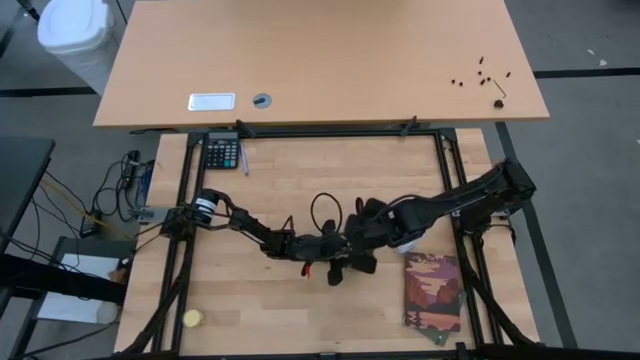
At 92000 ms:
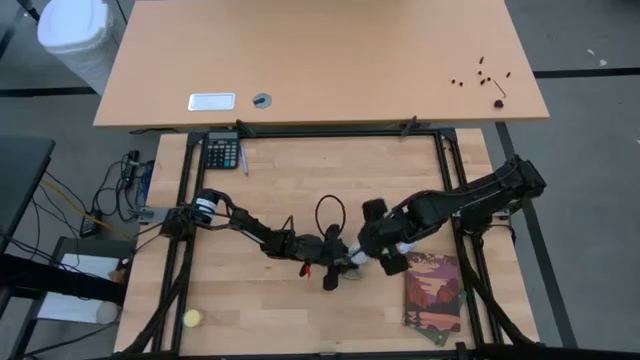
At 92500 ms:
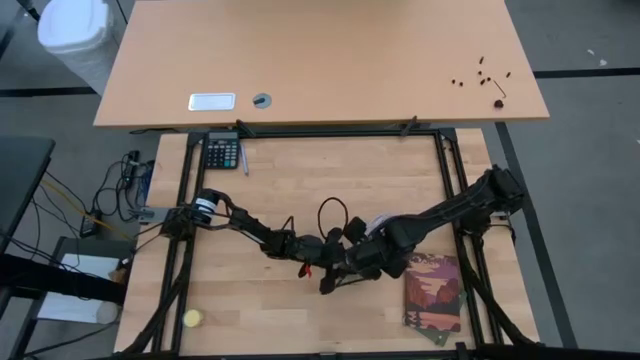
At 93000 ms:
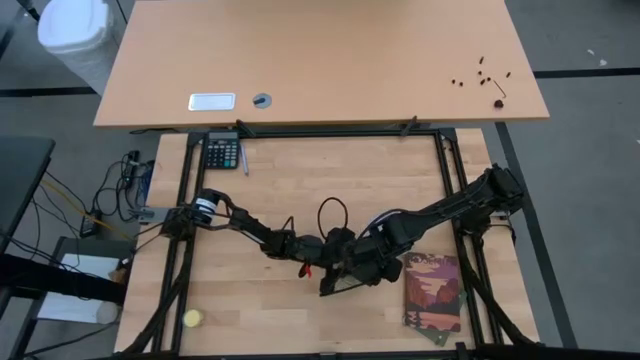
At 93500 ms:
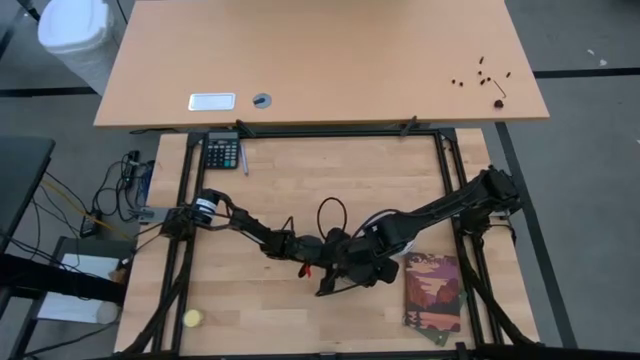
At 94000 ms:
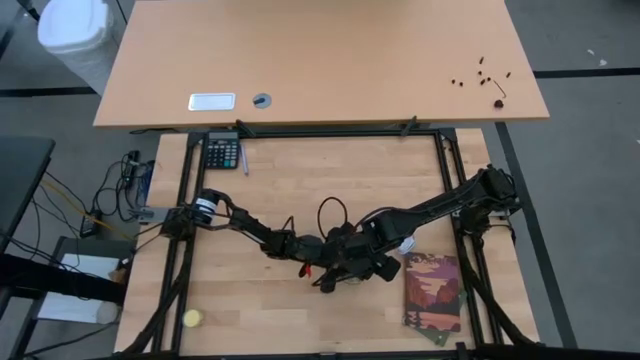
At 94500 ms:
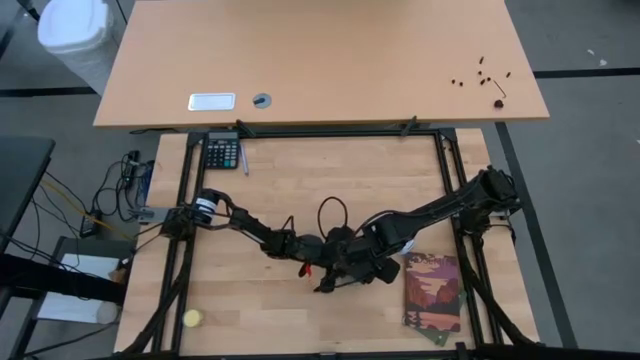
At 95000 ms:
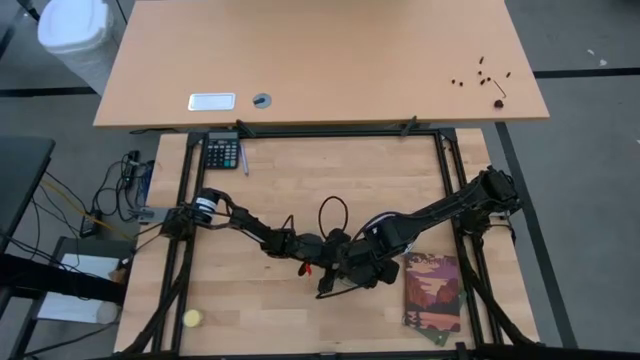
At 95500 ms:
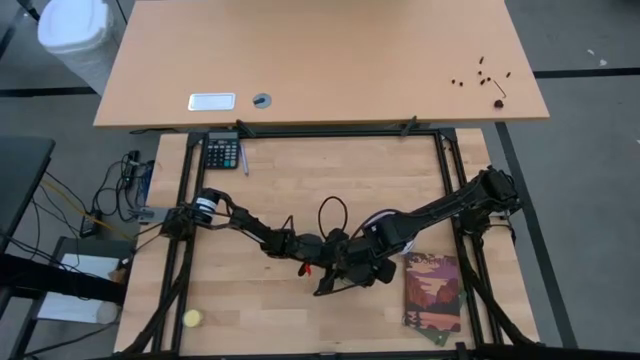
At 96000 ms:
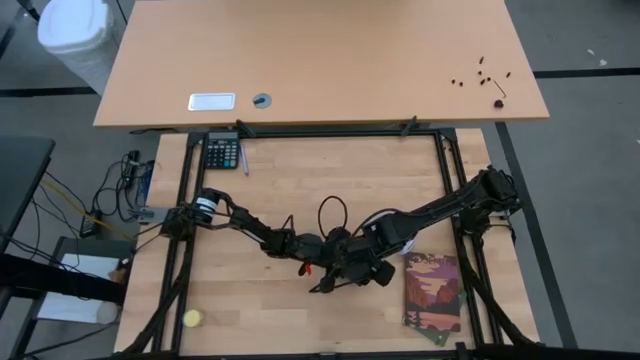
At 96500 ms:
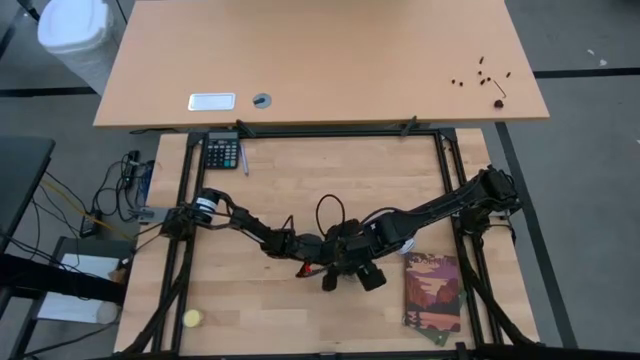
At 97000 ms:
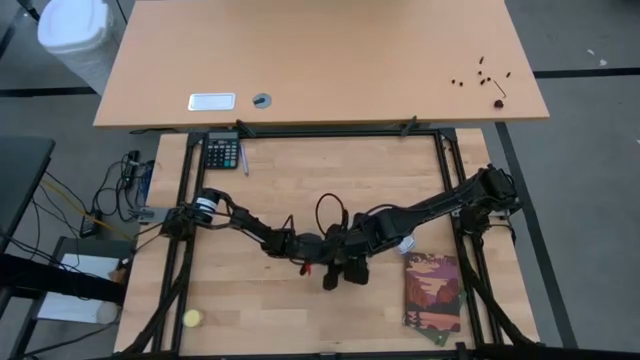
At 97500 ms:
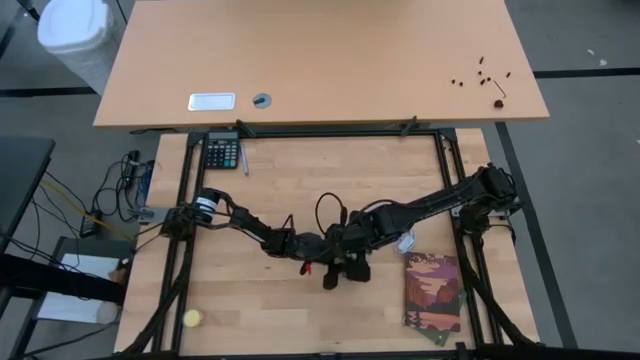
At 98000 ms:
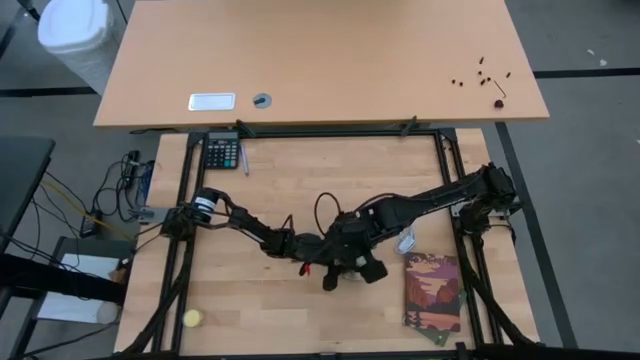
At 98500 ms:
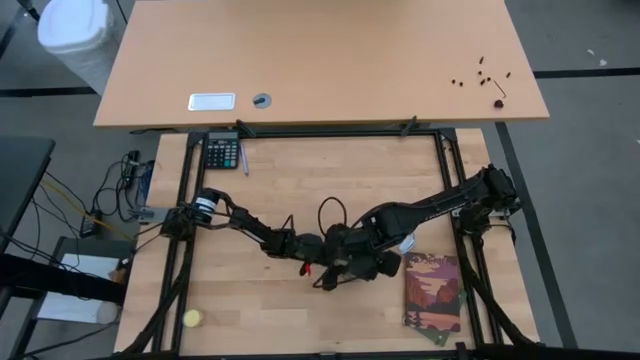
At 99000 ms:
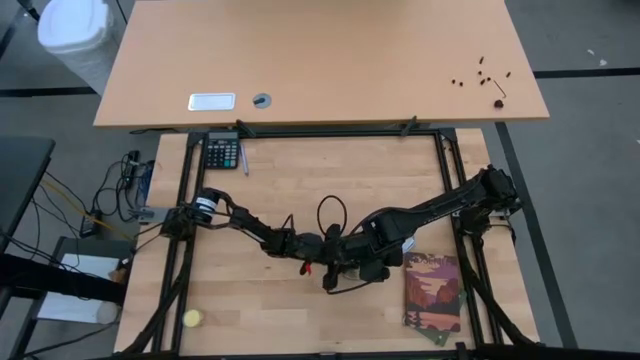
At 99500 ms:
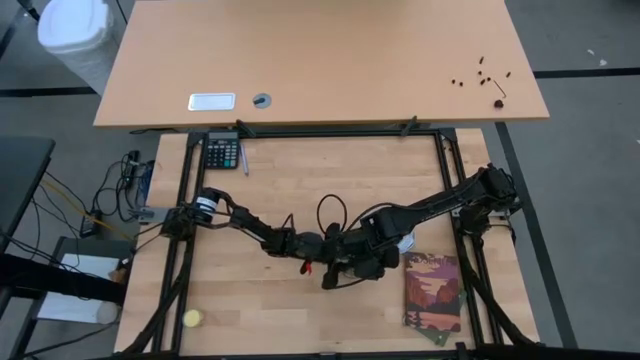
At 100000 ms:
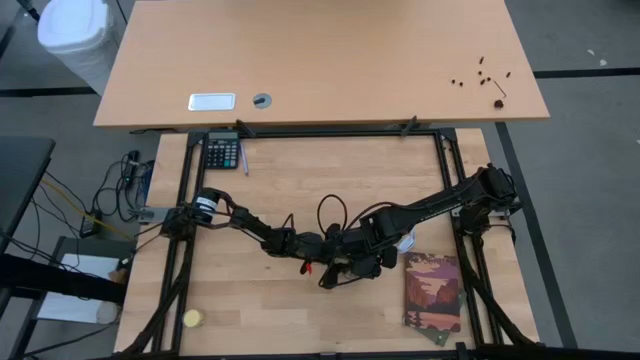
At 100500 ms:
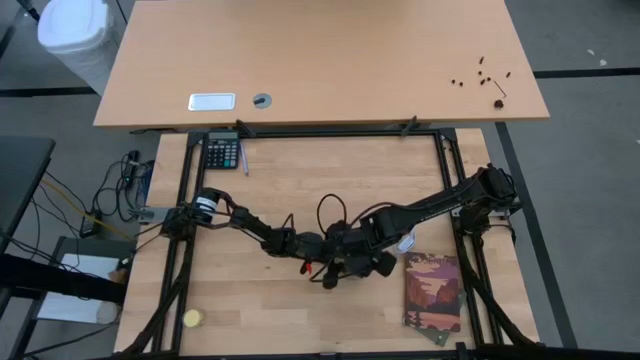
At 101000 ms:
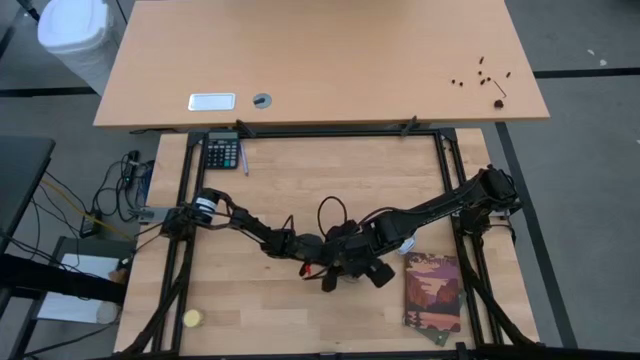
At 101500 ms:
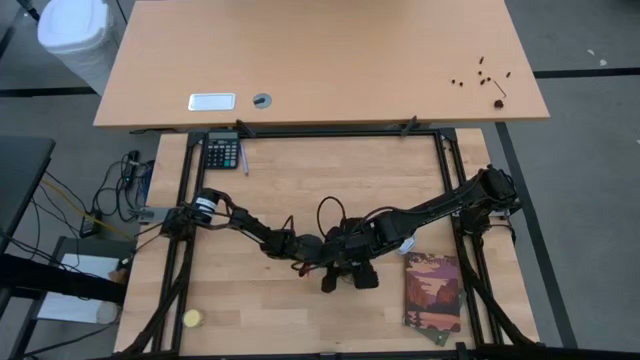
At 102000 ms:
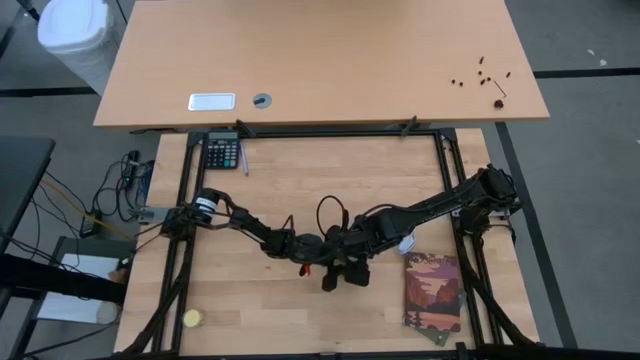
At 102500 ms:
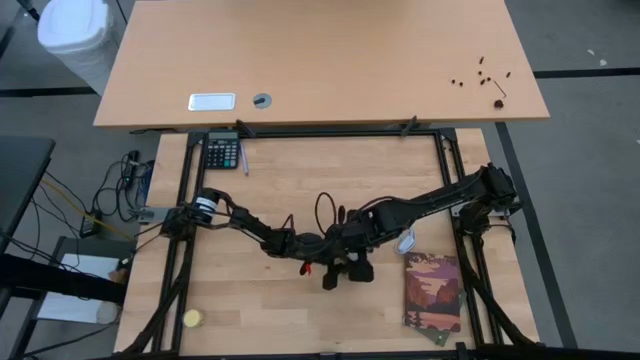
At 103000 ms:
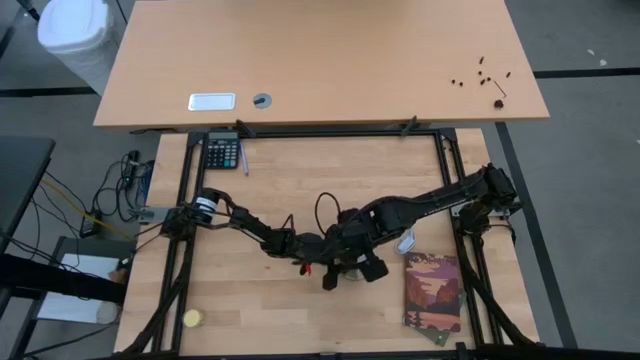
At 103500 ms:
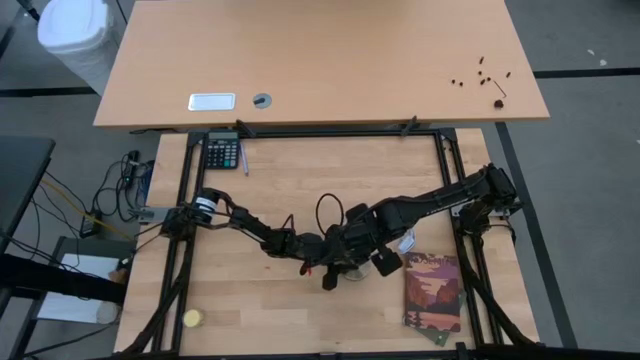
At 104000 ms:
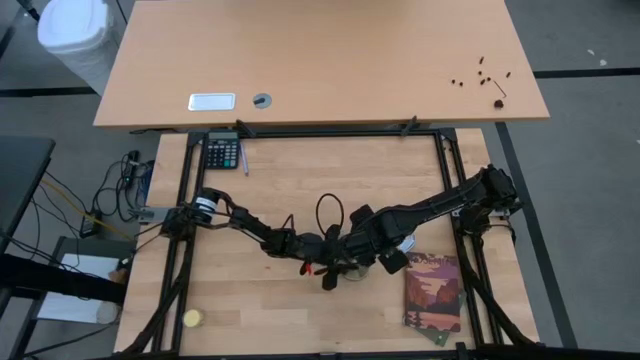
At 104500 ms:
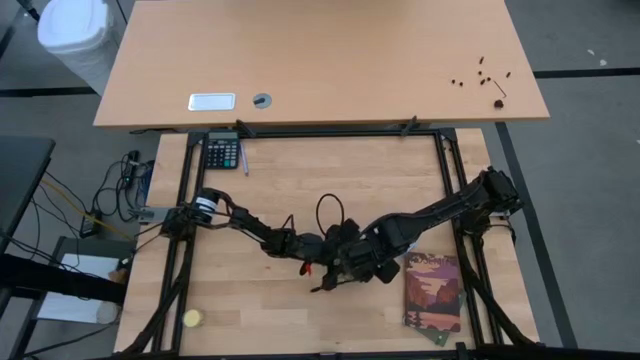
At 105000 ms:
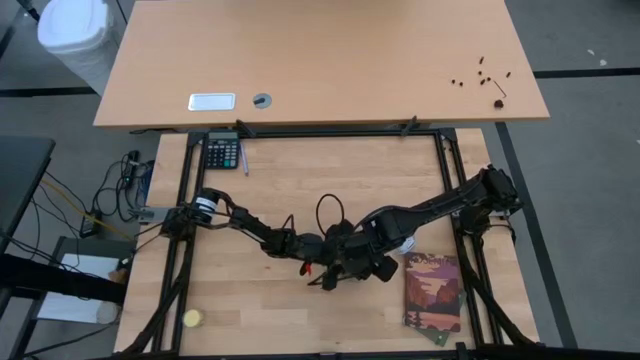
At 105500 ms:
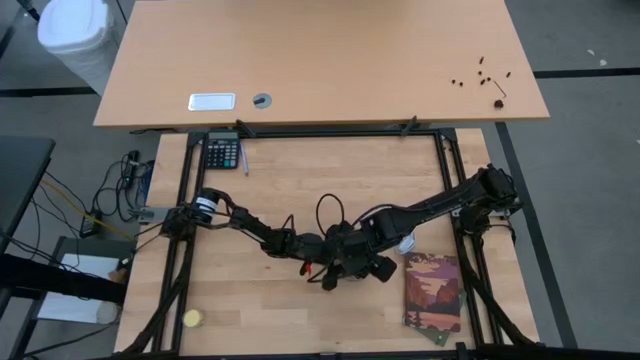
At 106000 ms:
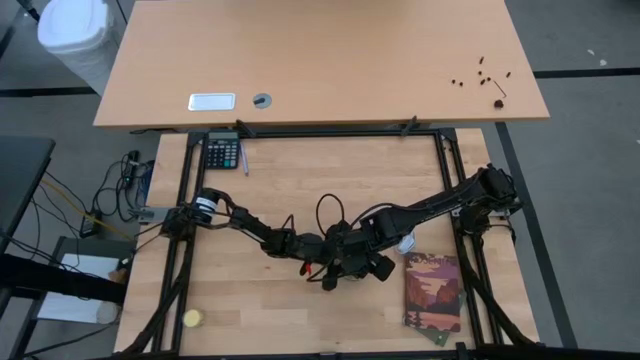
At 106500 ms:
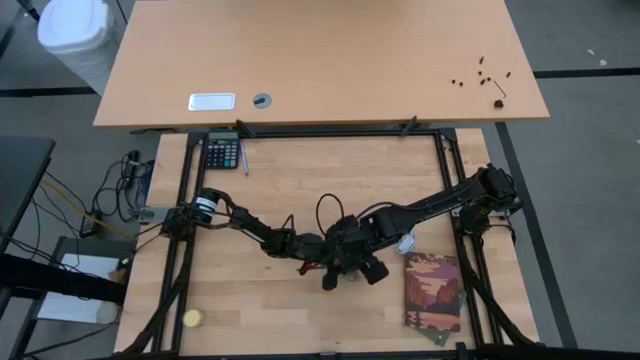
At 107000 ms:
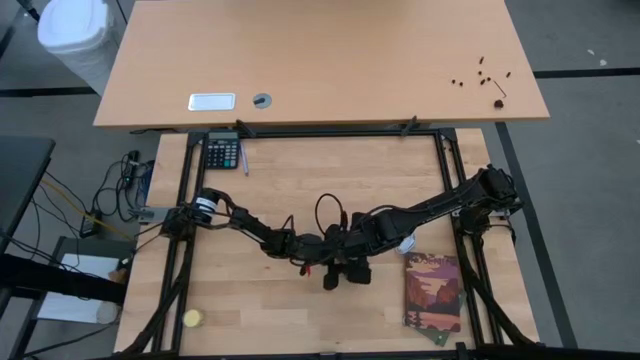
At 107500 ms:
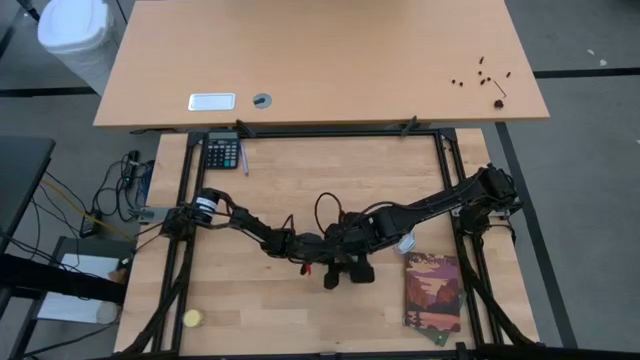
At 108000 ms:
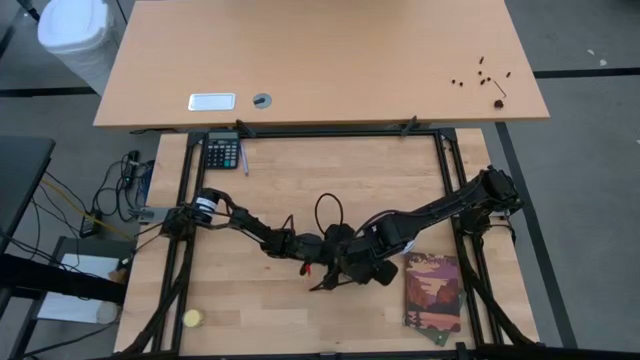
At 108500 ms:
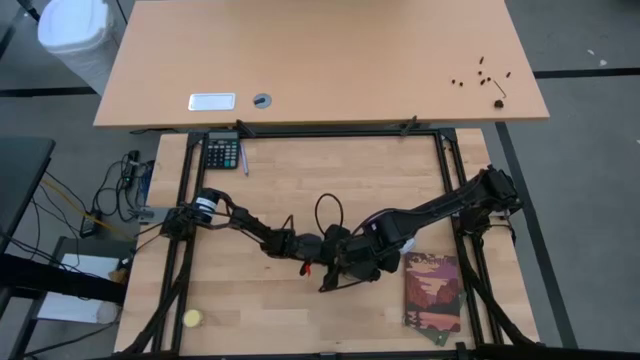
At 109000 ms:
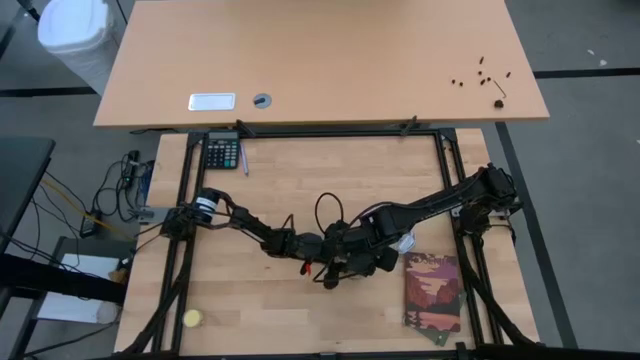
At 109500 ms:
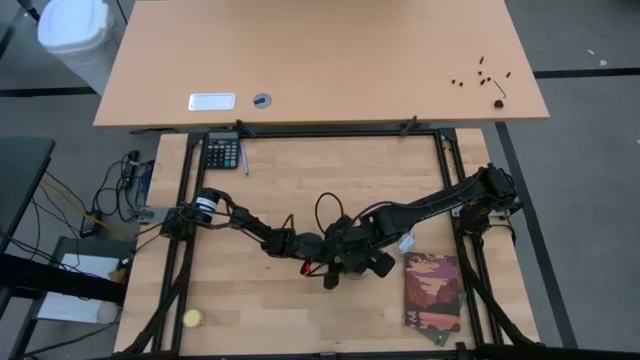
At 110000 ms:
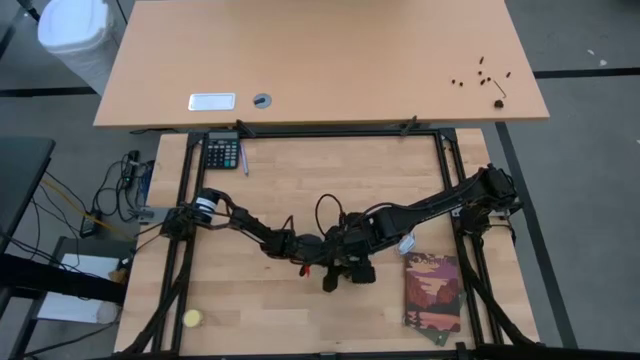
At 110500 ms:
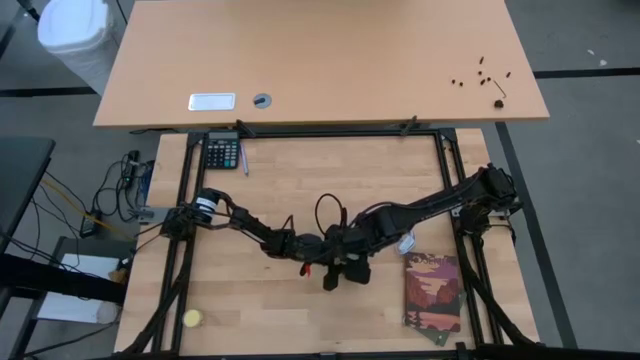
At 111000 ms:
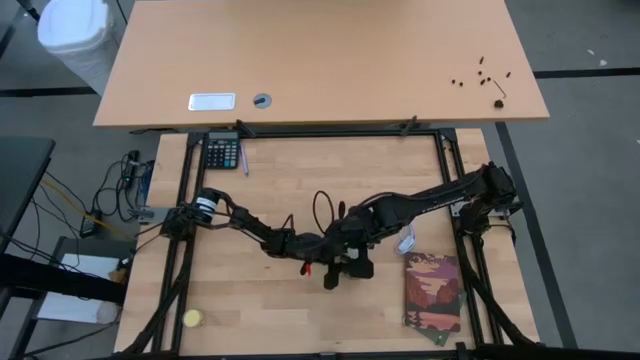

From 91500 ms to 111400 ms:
Task: Screw lightbulb
Insert the lightbulb into the lamp socket

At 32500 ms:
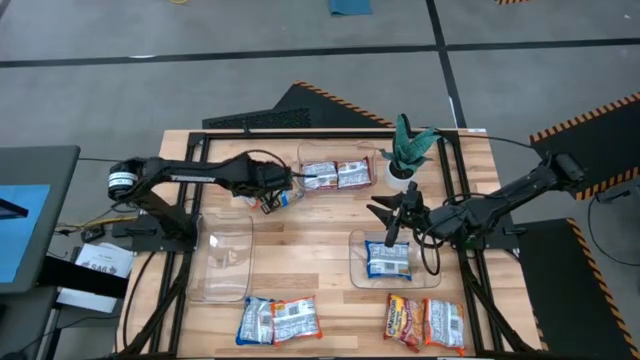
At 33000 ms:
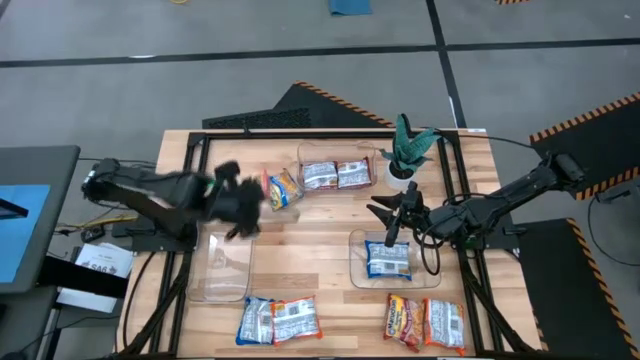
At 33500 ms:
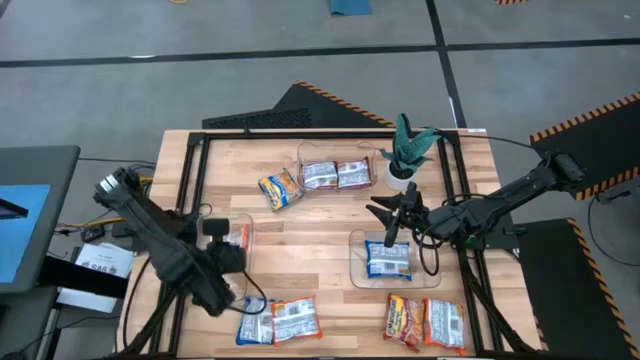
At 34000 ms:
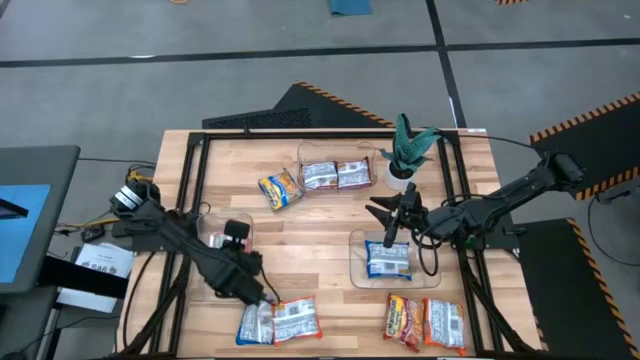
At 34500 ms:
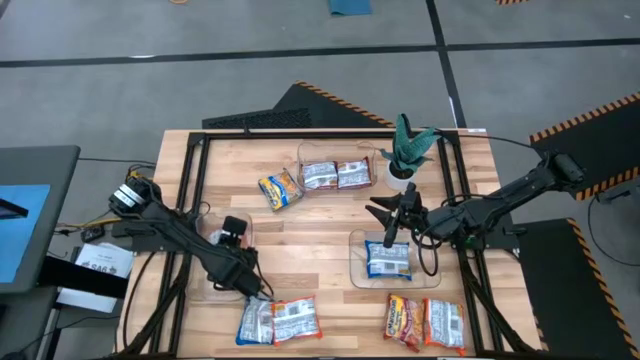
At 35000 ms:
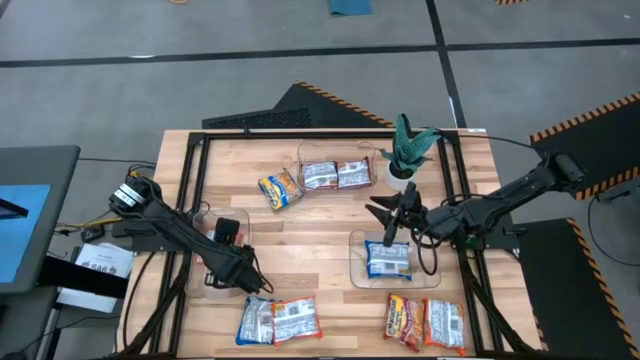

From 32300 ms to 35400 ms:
Task: Sort Maruchan noodles
Put the top left orange bag into the bottom left transparent bin
